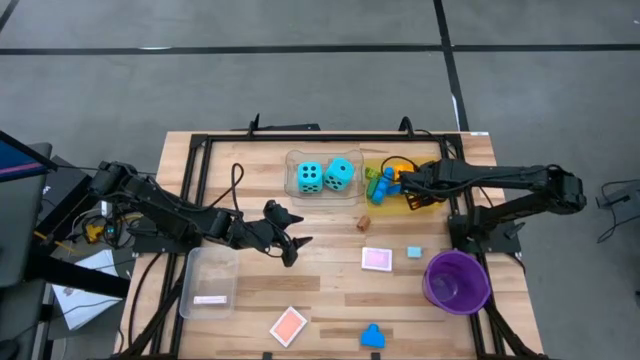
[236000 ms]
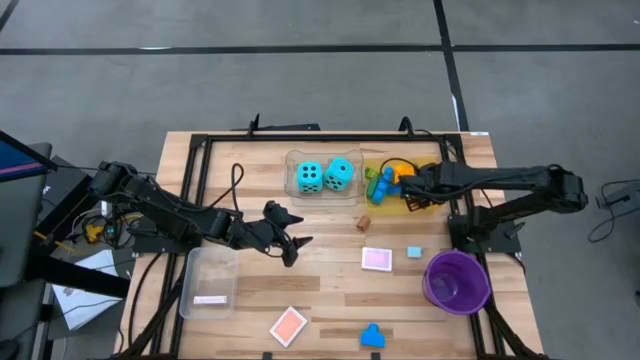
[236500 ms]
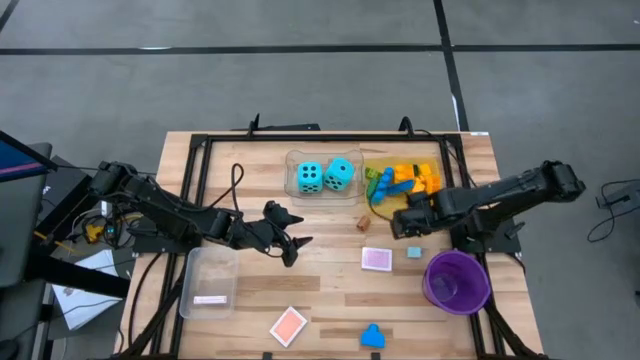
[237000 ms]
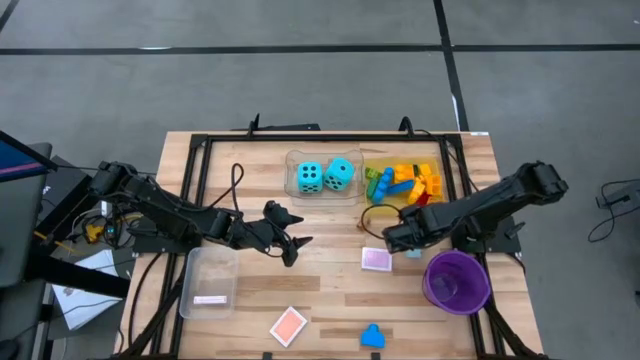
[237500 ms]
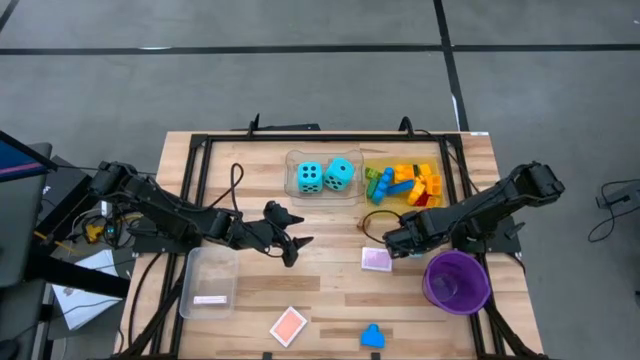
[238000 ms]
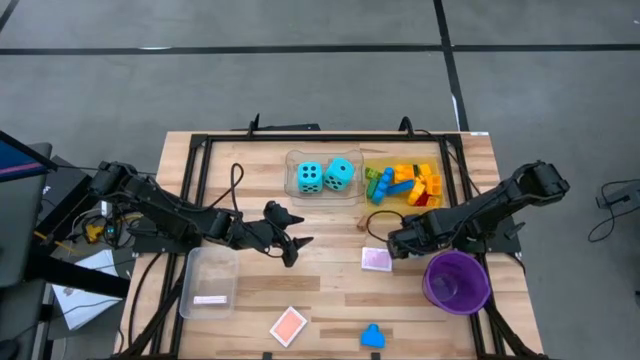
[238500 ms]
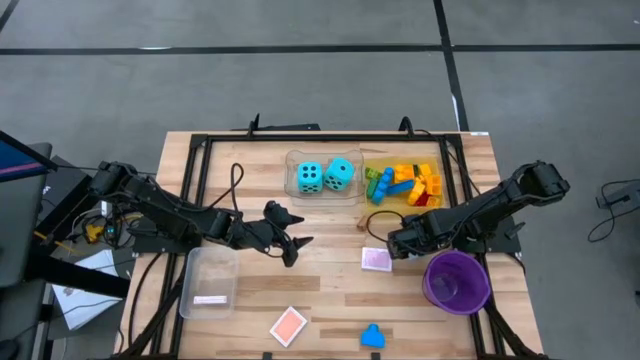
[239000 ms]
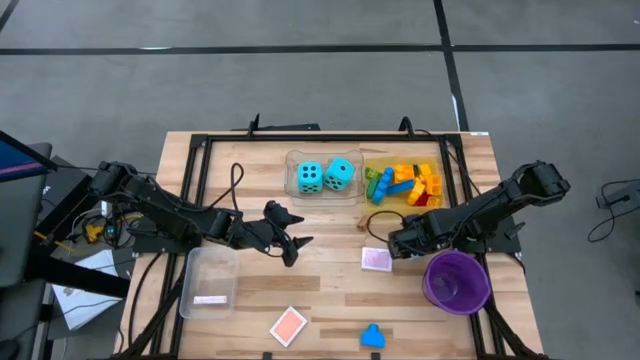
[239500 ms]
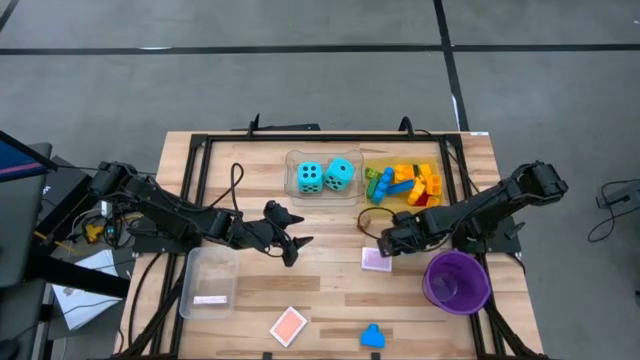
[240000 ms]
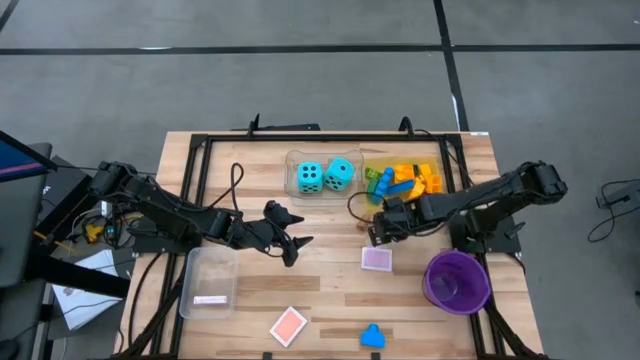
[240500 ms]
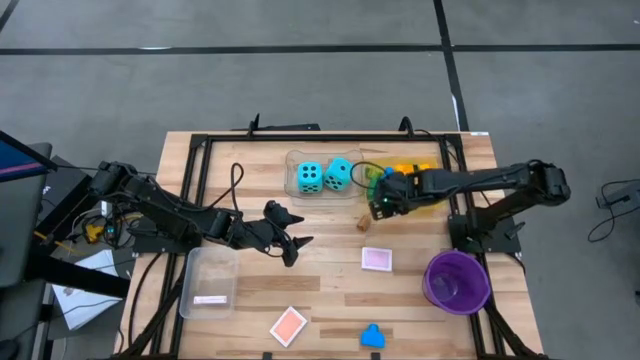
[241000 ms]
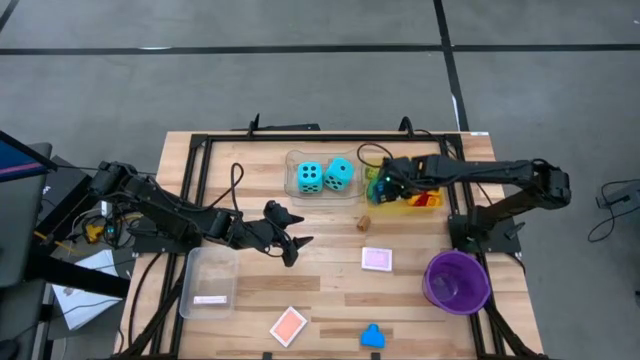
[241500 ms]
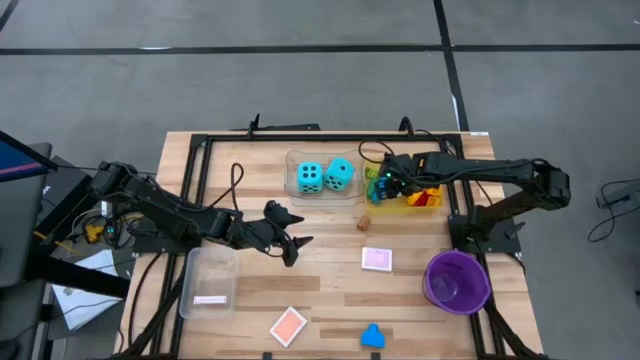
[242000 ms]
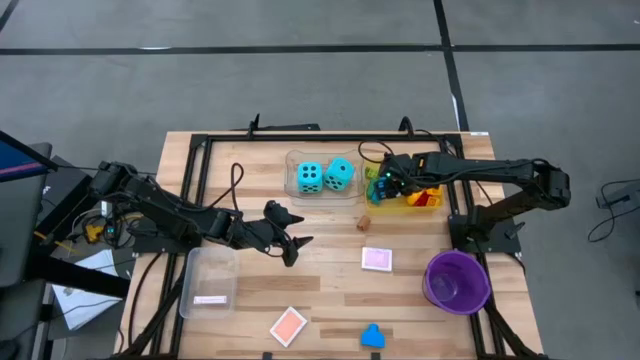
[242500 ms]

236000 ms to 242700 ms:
Task: Pick & Place Toys
Put the light blue game piece into the yellow bin

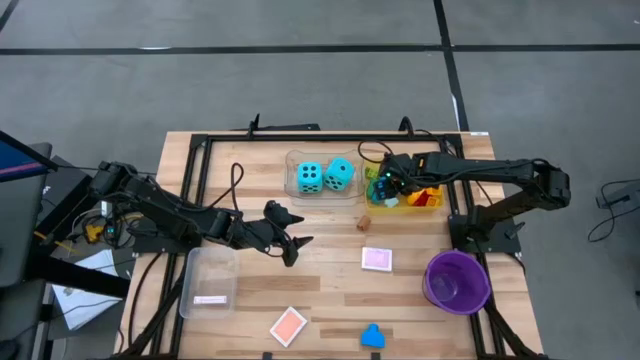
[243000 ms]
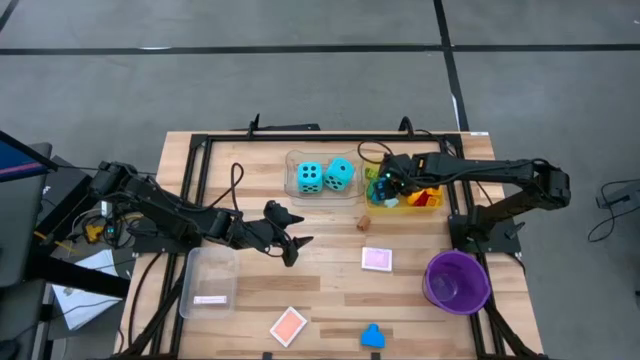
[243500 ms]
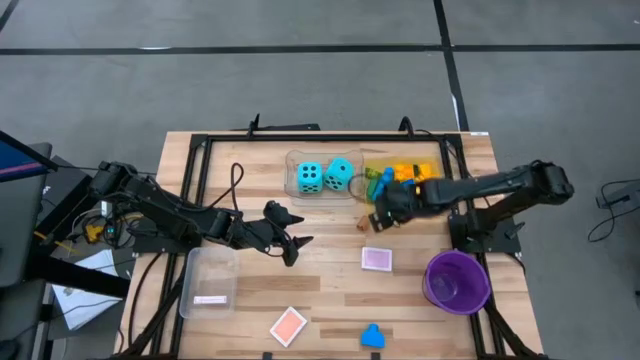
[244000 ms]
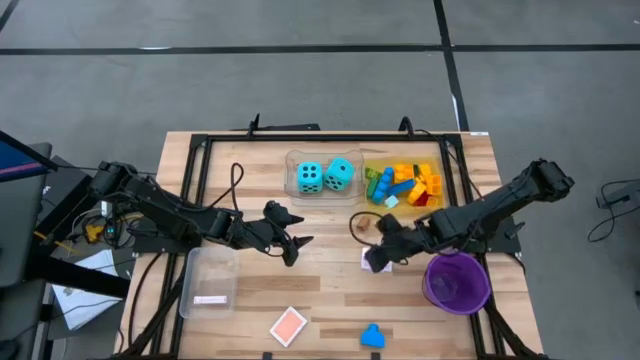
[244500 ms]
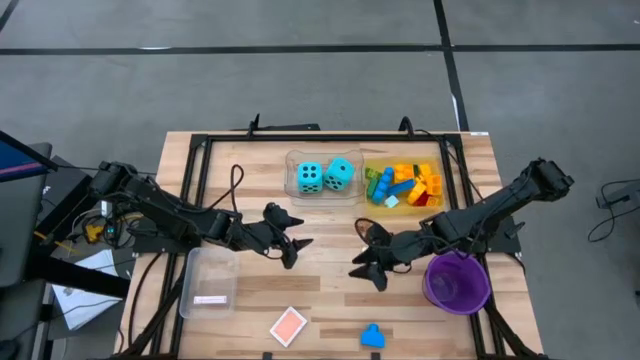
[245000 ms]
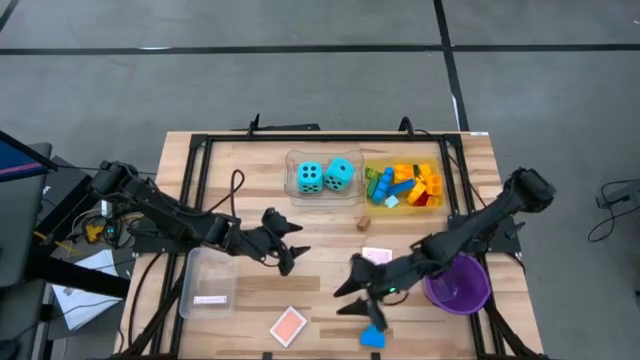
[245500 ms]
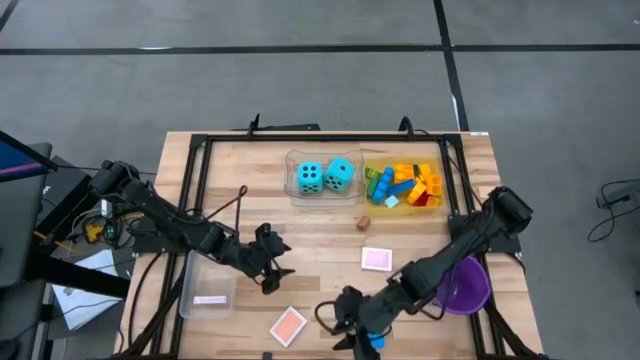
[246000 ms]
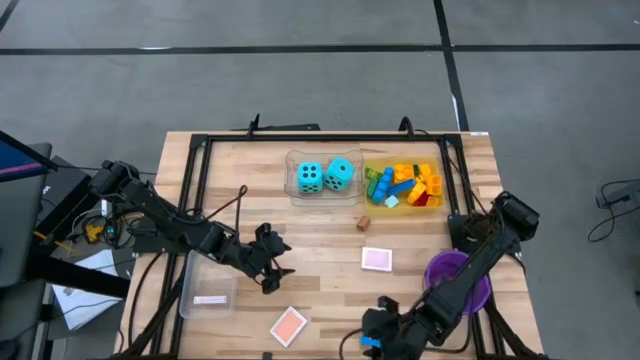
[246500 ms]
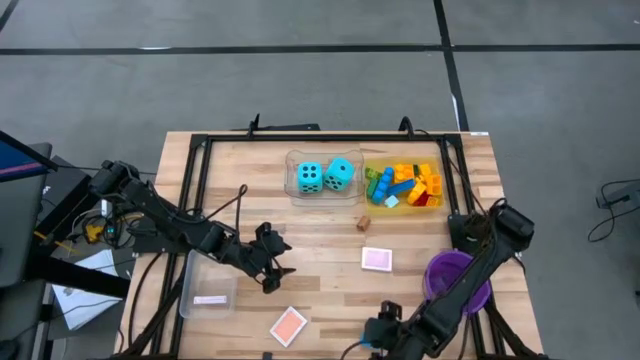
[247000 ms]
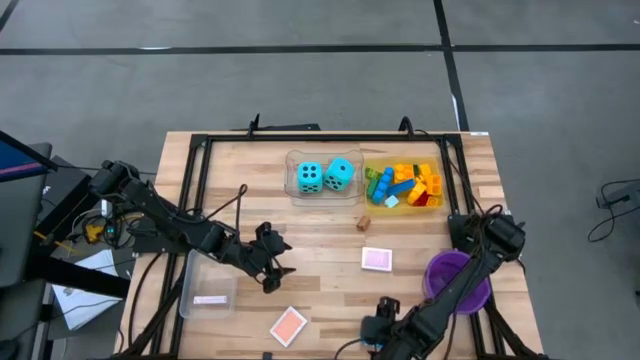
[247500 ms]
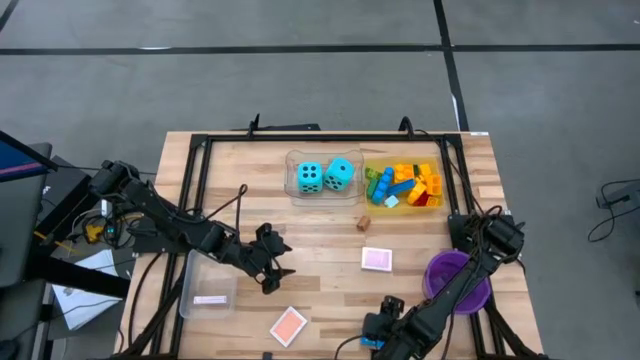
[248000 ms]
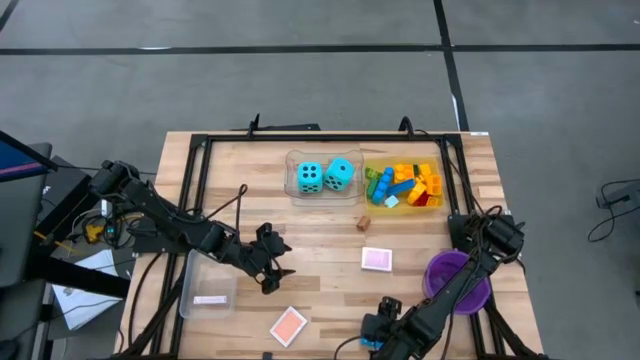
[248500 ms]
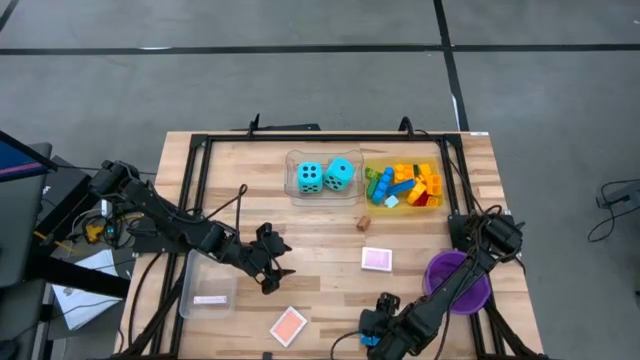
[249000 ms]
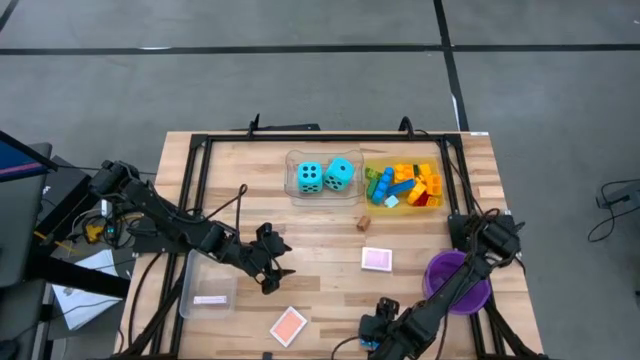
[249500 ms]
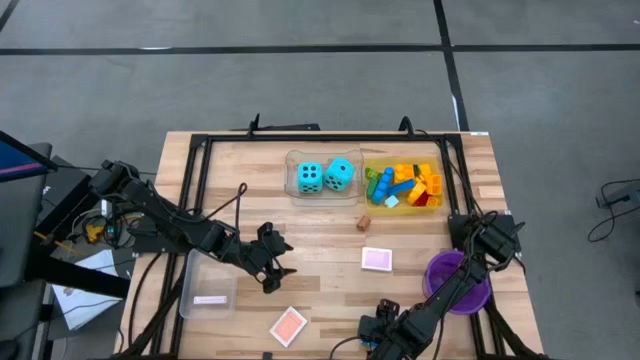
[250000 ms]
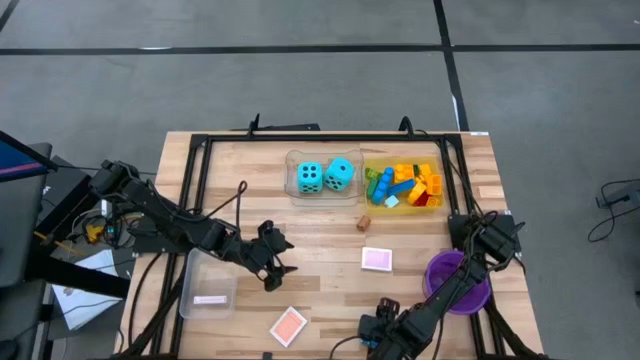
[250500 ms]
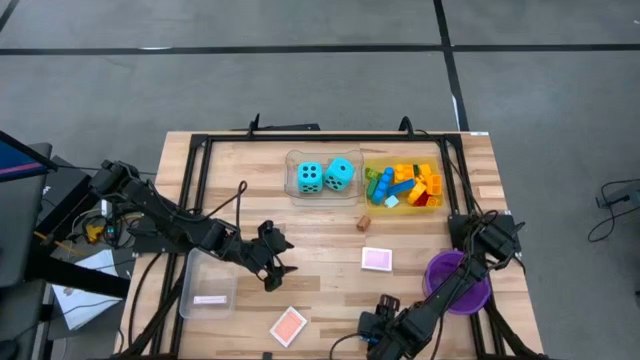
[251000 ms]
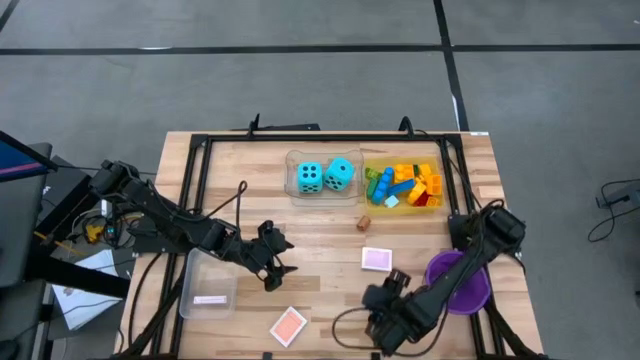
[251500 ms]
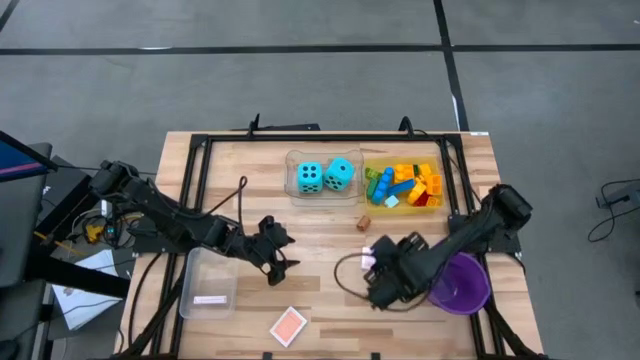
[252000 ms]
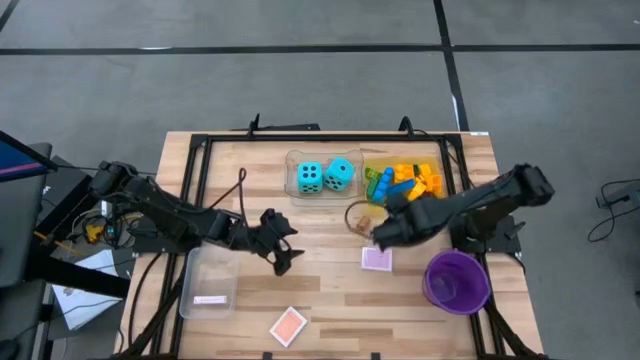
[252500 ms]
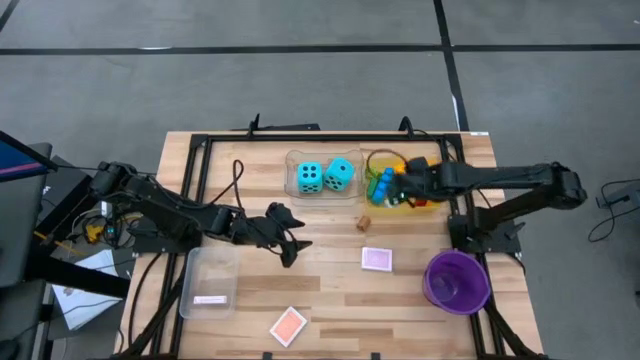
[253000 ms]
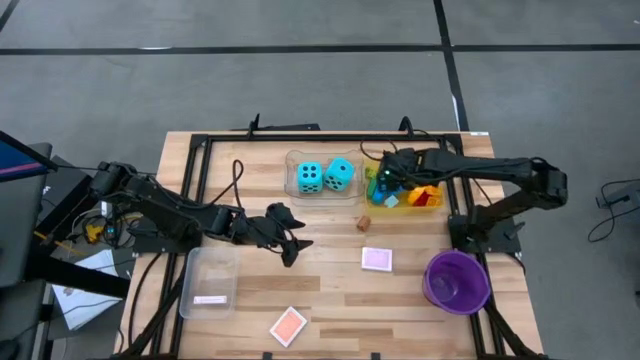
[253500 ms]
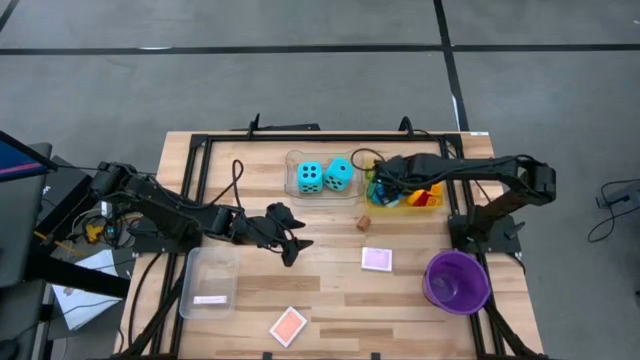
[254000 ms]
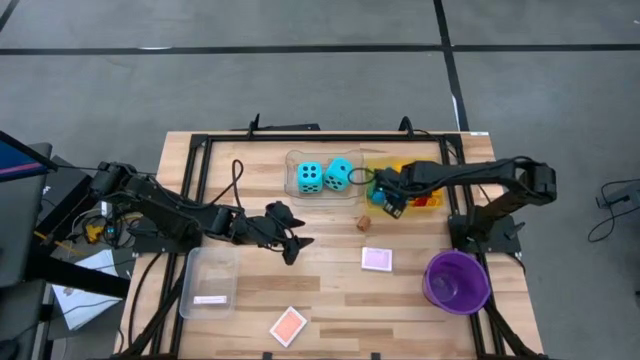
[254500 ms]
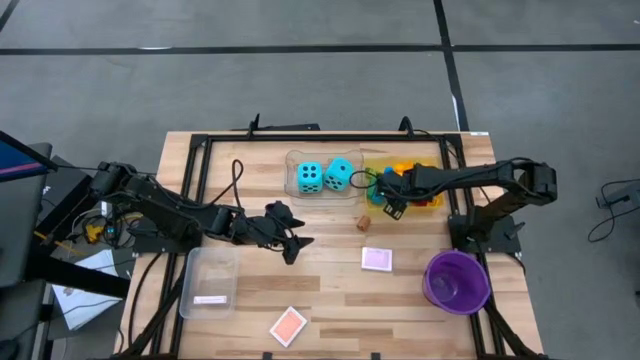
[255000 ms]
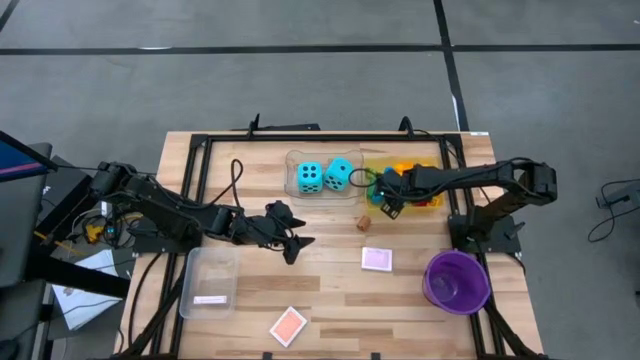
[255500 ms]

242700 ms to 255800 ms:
Put the blue game piece into the yellow bin
